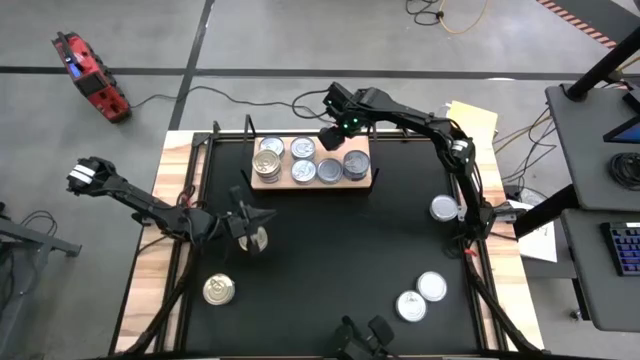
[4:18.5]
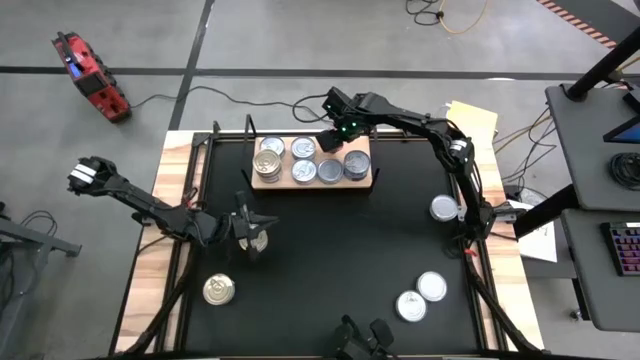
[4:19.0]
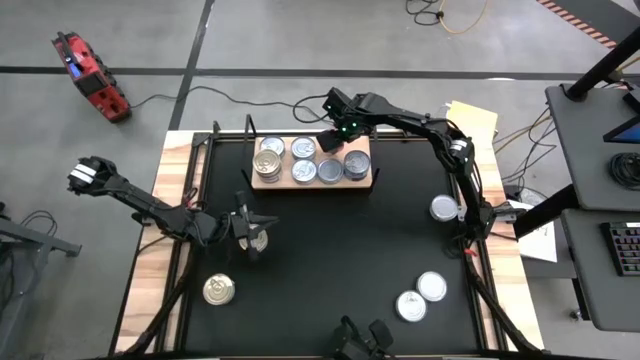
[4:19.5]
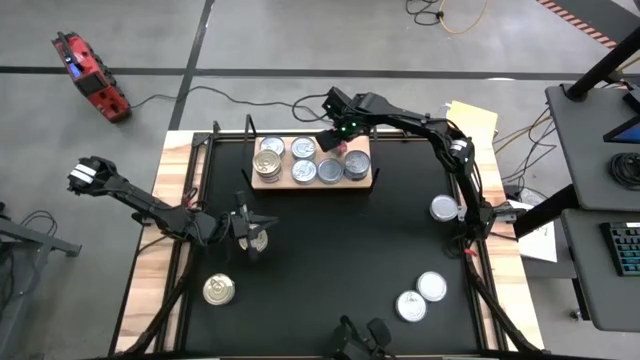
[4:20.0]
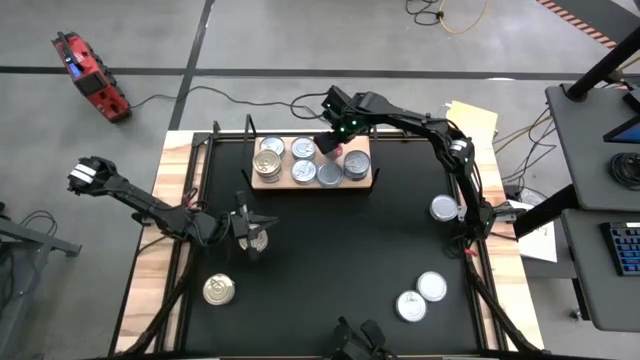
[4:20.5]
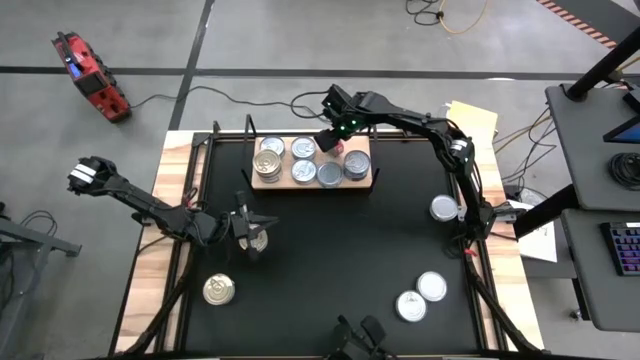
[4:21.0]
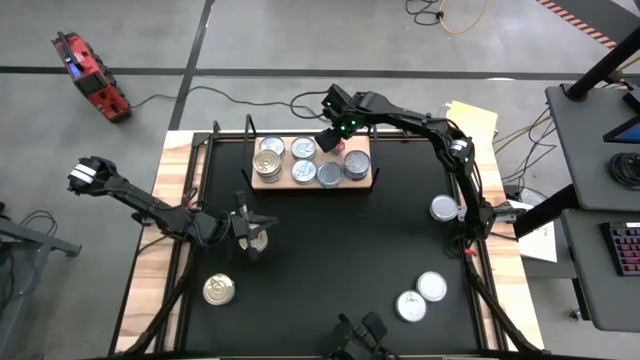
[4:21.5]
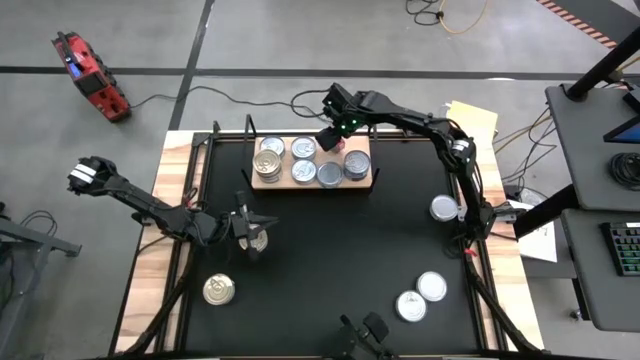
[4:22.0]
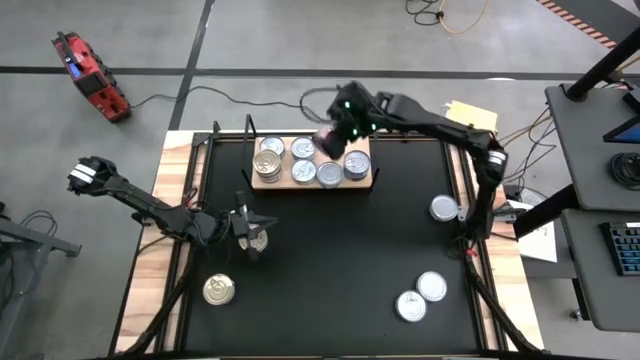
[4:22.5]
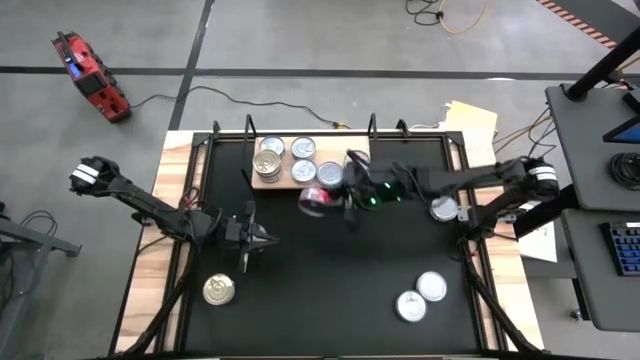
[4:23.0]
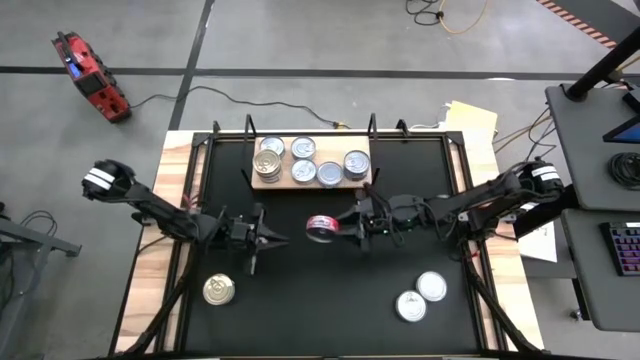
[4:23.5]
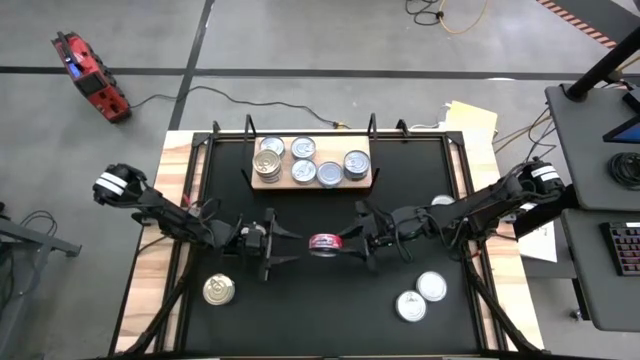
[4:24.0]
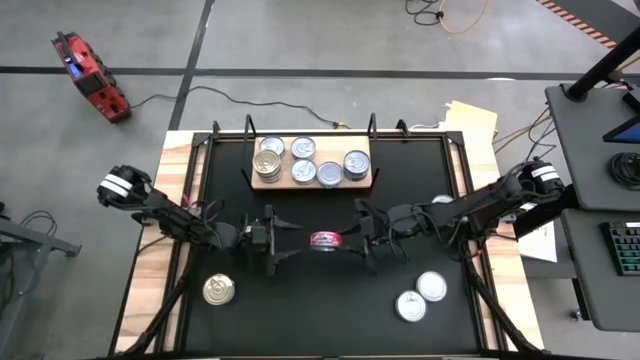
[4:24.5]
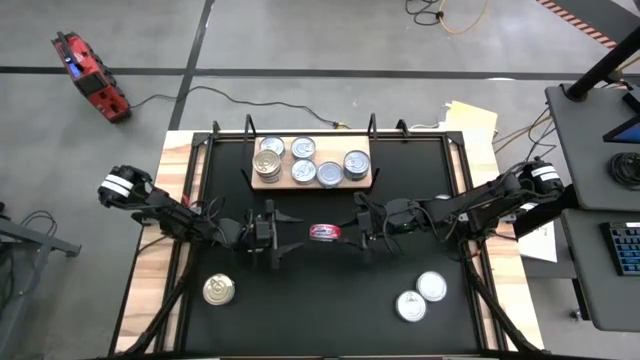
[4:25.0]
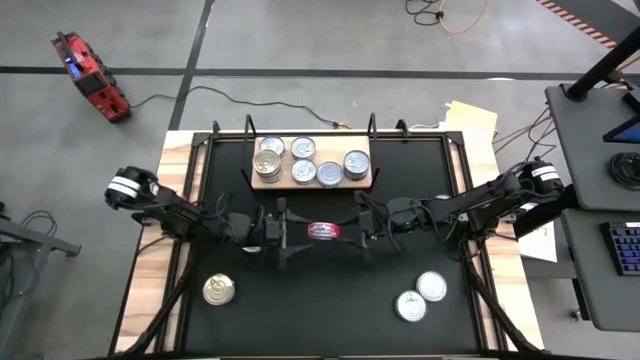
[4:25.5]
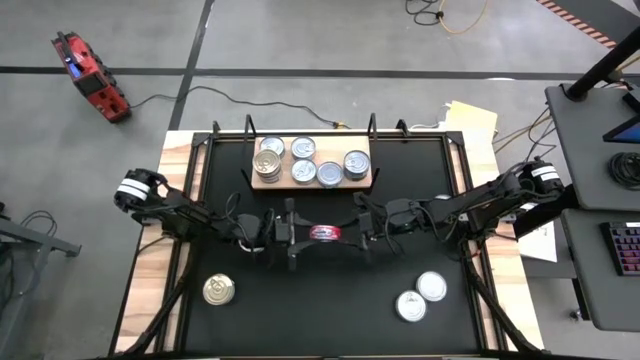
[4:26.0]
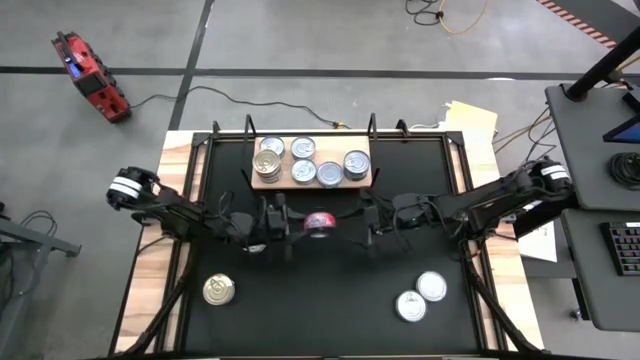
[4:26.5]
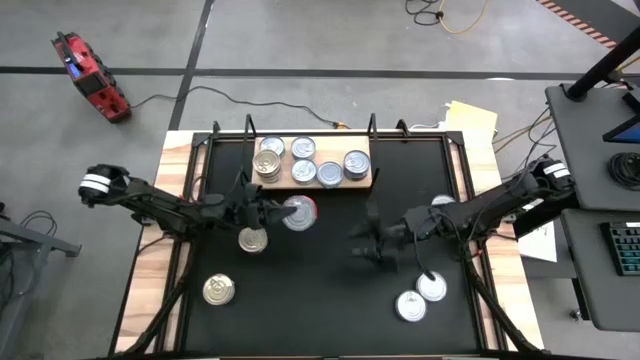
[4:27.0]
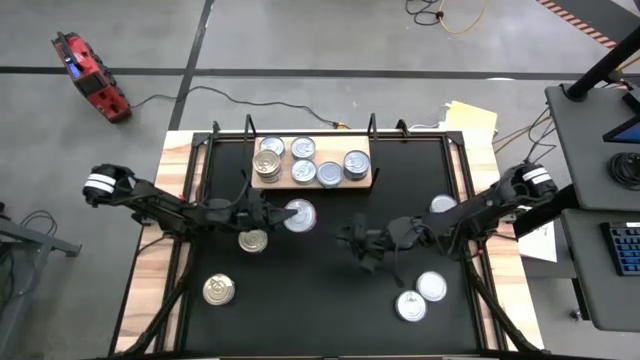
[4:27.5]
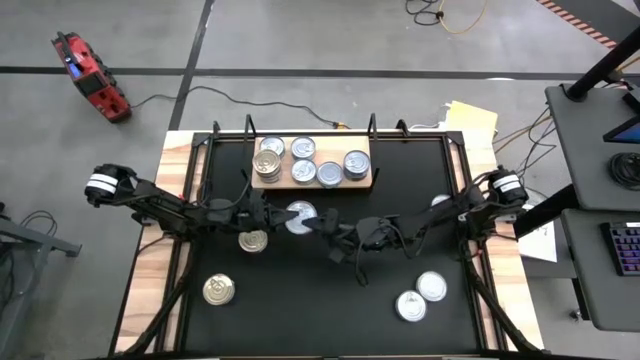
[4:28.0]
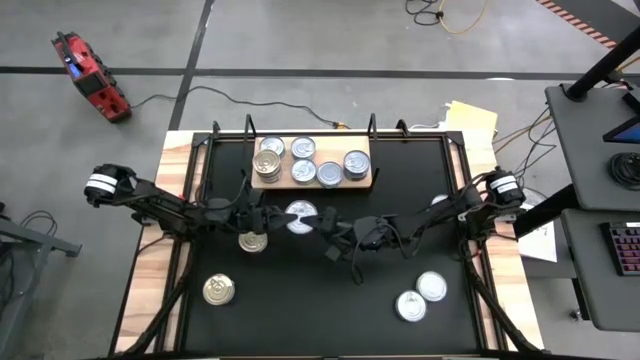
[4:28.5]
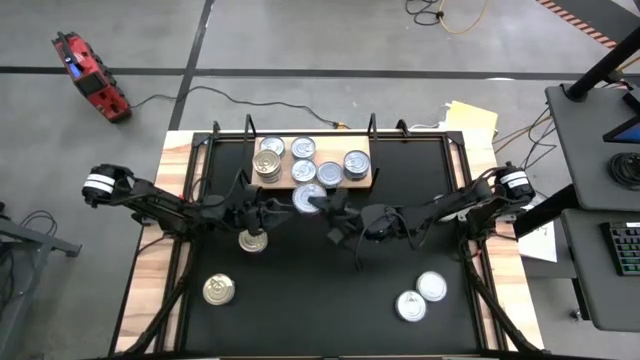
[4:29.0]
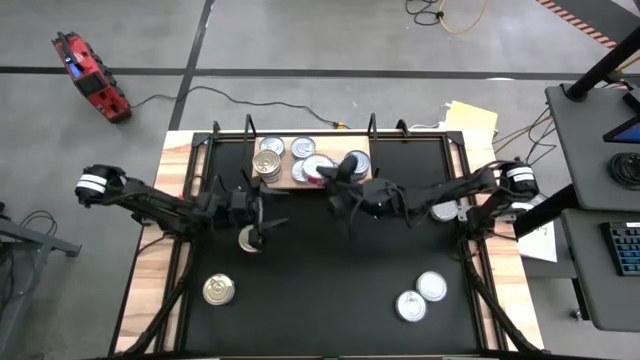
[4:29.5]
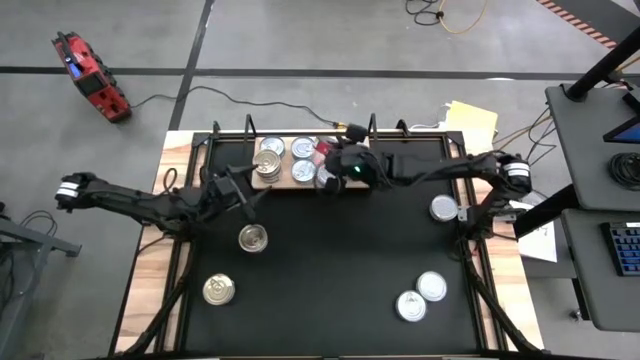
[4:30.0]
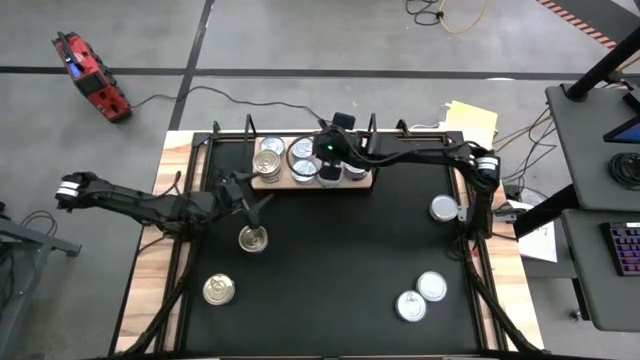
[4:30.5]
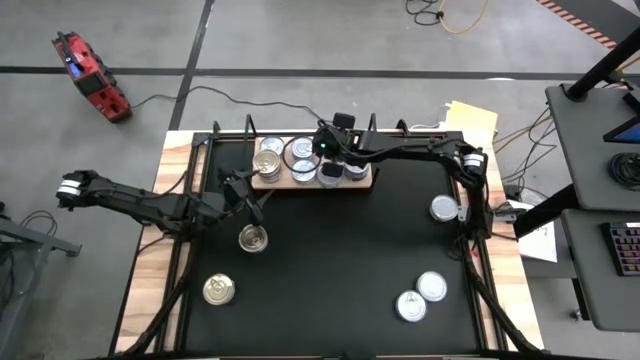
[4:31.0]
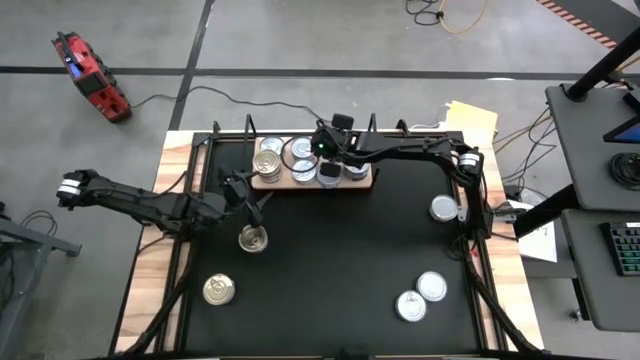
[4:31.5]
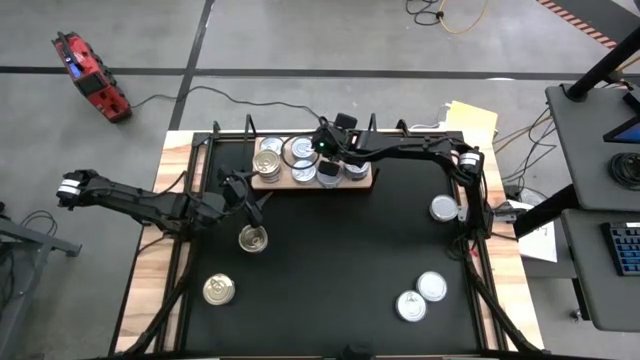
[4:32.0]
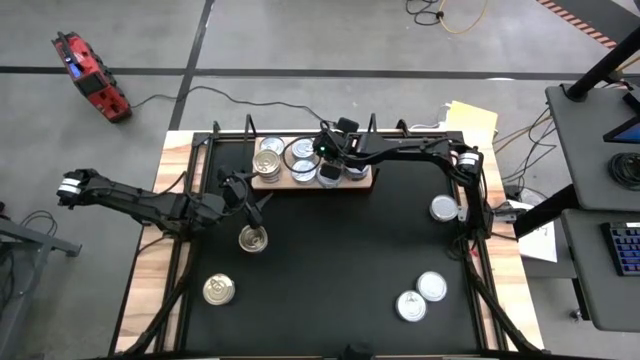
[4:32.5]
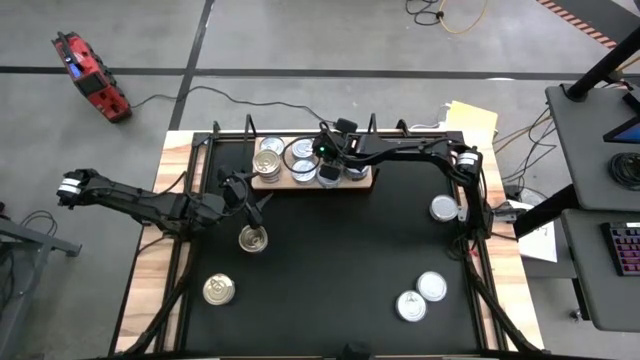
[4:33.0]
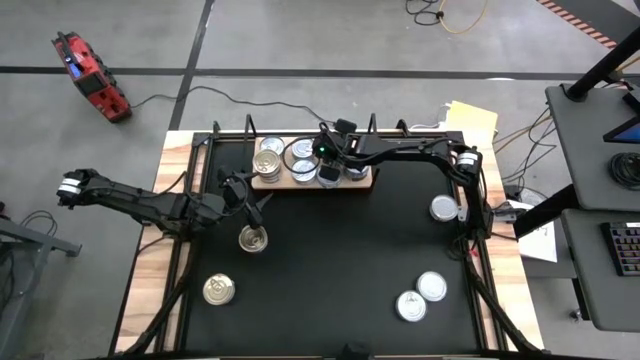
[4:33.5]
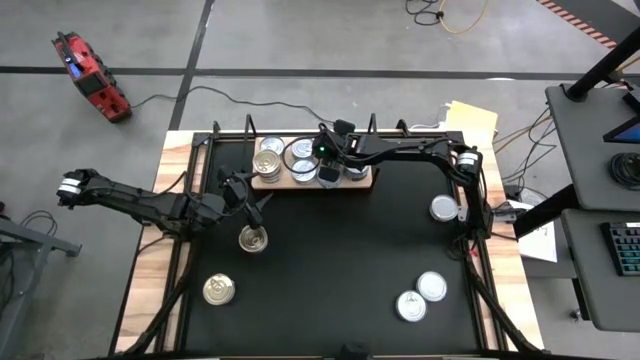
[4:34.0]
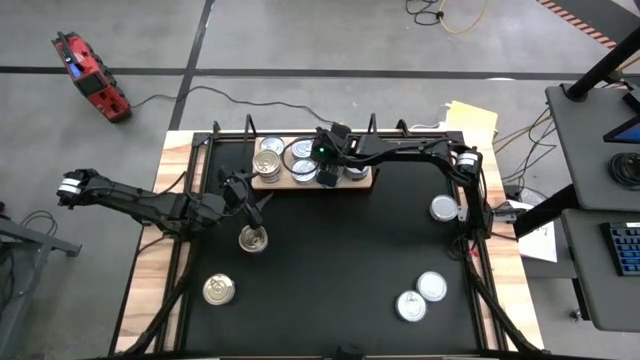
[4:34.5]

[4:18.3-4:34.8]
Task: Stack canned seafood by type on shelf
Put the red tuna can on the shelf

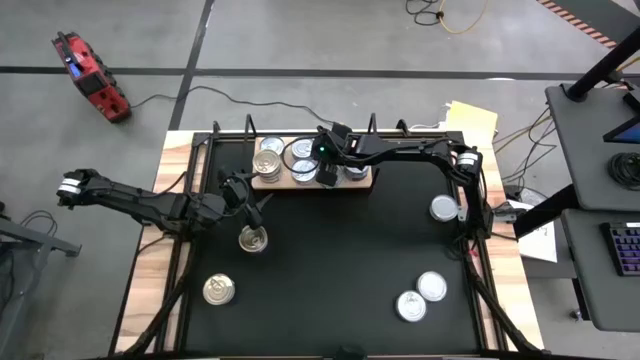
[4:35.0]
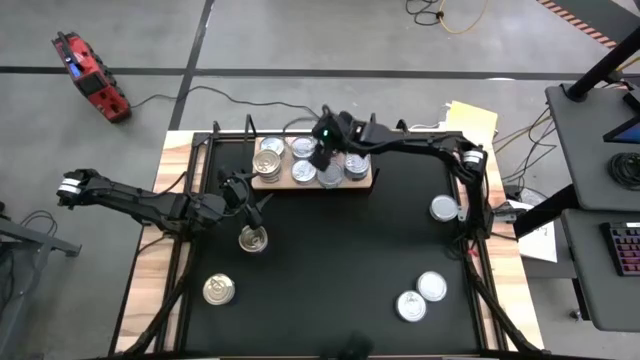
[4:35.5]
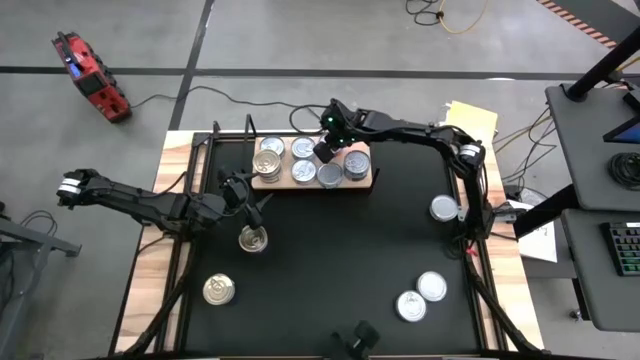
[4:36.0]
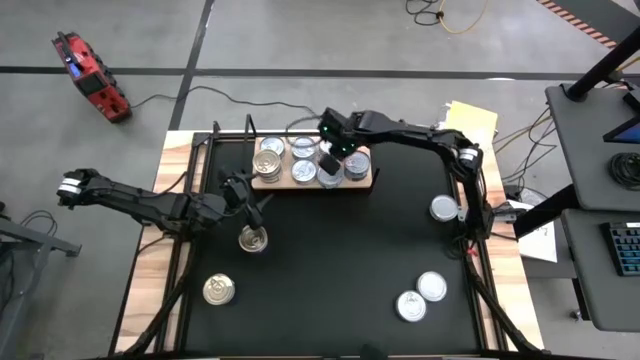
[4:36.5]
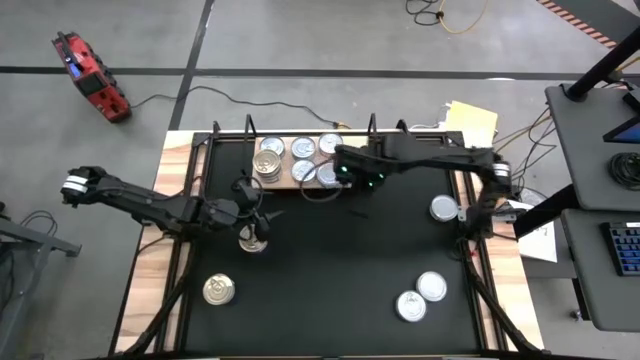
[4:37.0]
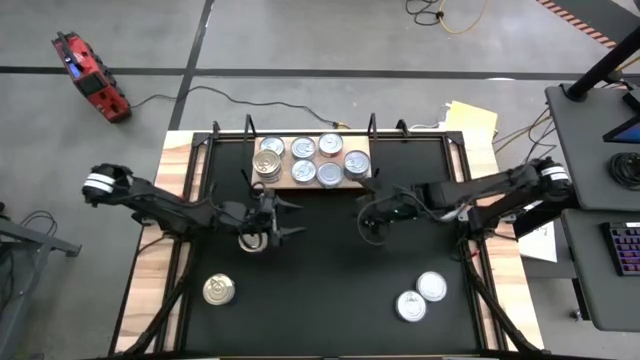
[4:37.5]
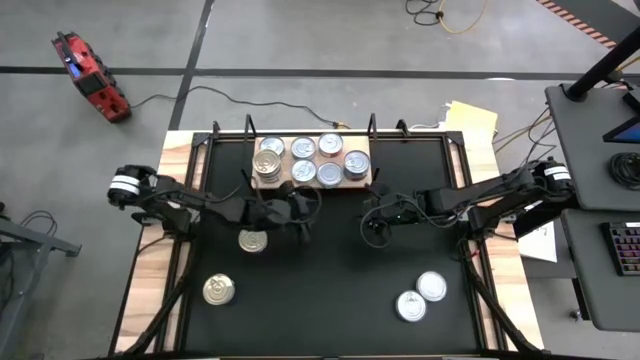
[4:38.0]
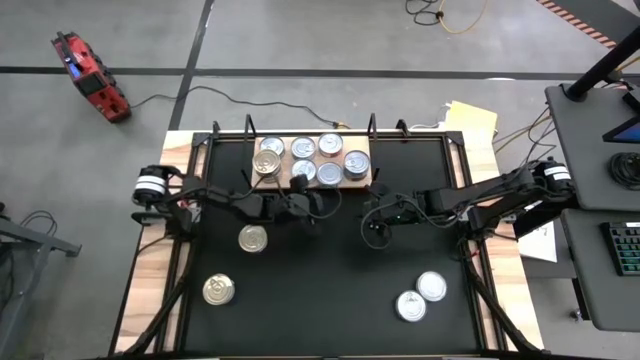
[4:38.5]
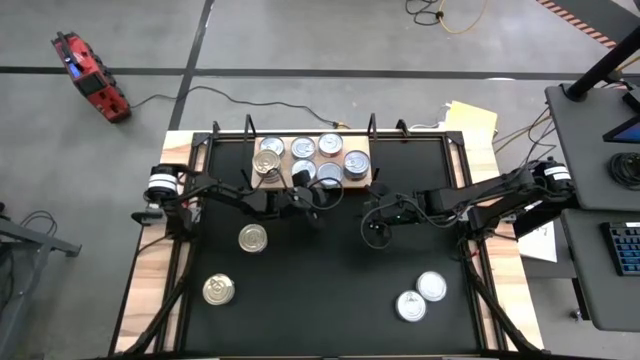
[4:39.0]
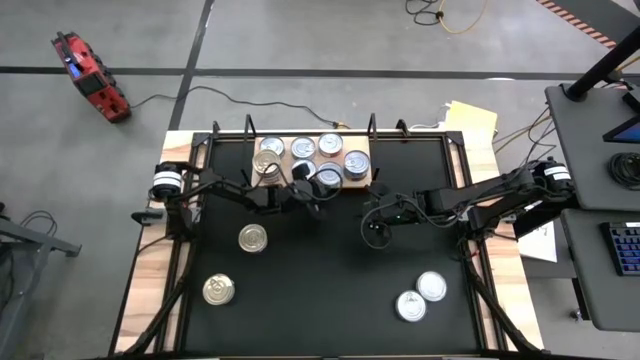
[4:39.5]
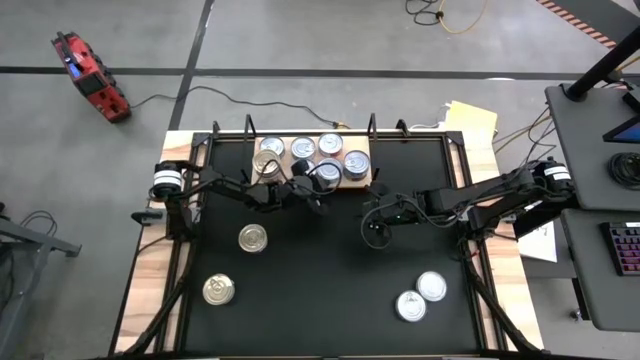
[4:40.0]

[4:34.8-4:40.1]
Adjust the green tuna can on the shelf
